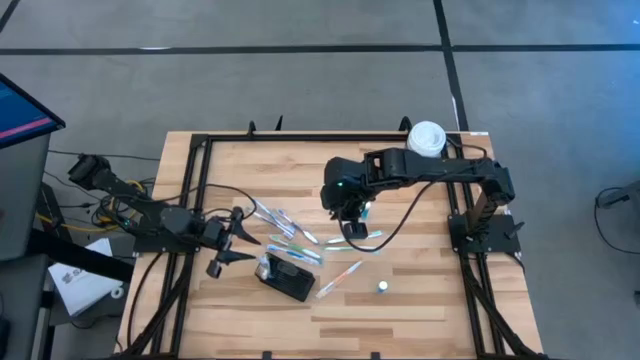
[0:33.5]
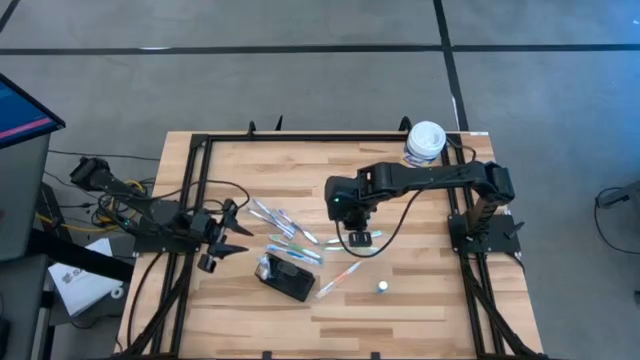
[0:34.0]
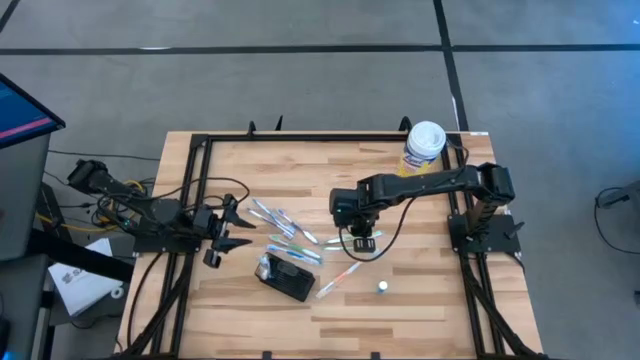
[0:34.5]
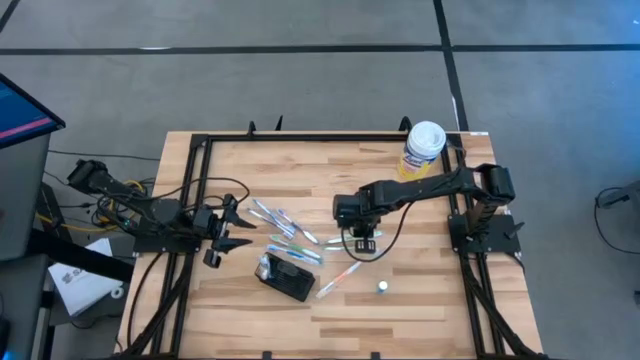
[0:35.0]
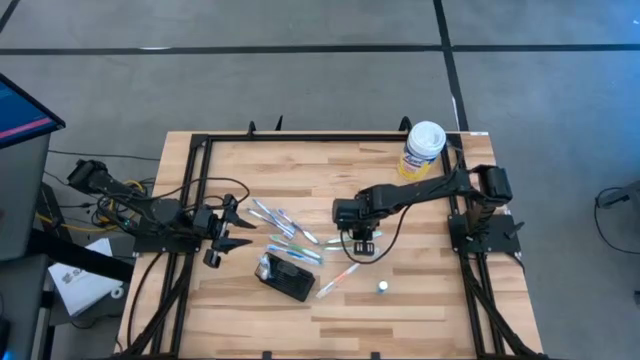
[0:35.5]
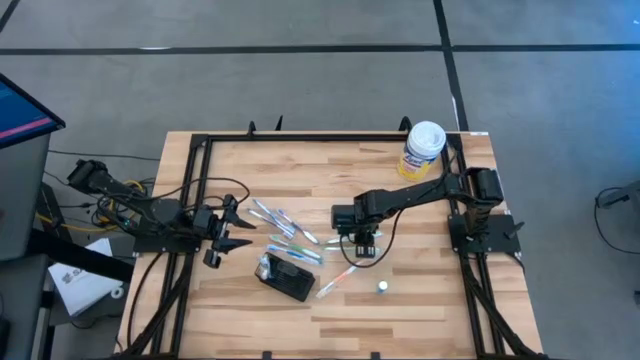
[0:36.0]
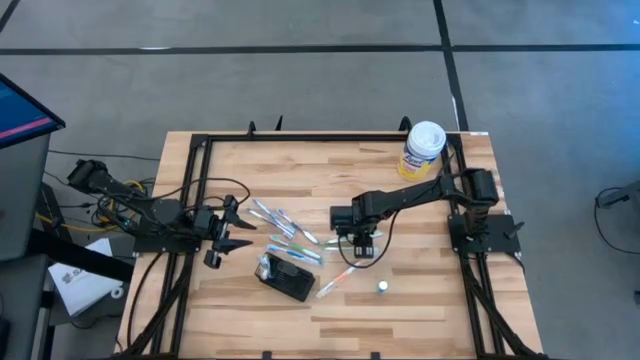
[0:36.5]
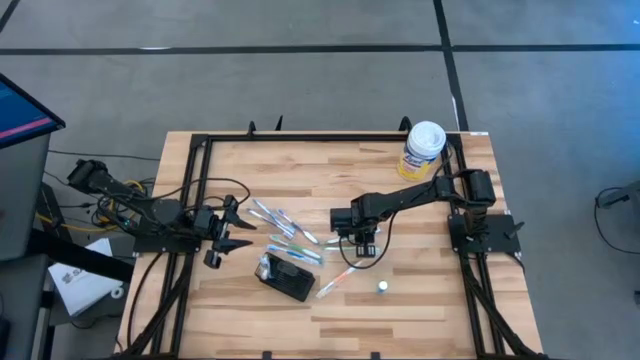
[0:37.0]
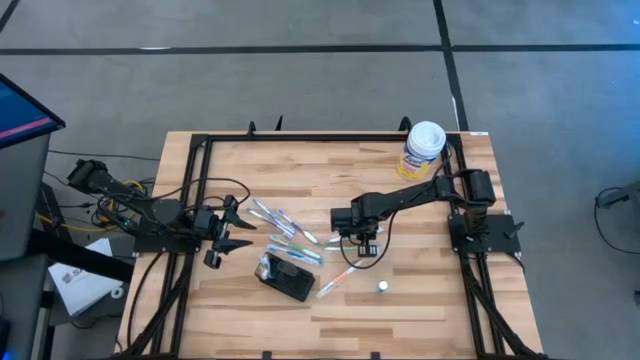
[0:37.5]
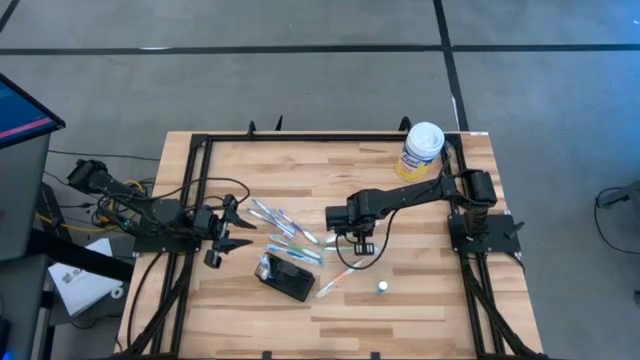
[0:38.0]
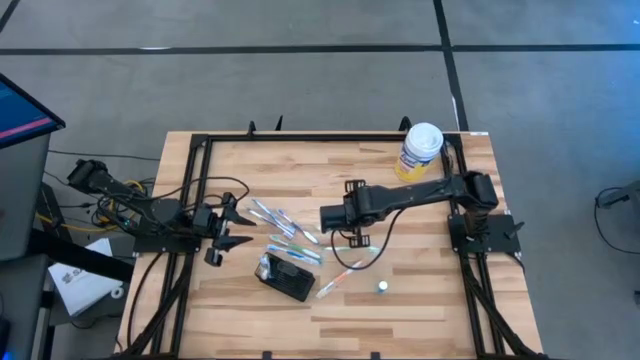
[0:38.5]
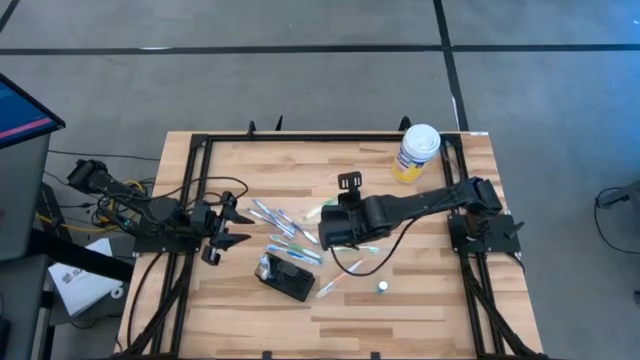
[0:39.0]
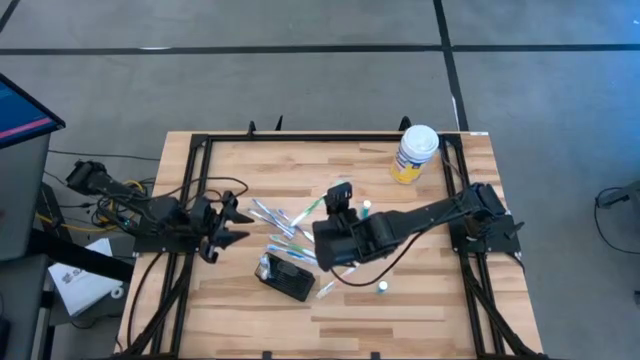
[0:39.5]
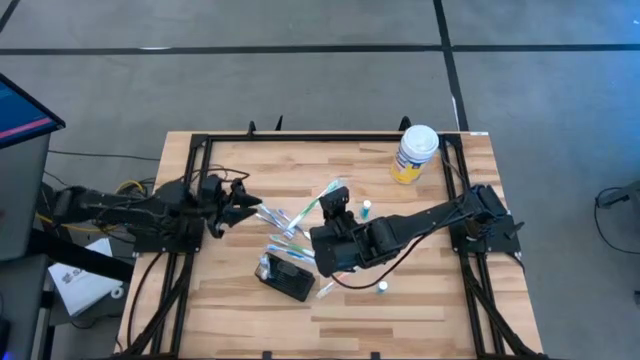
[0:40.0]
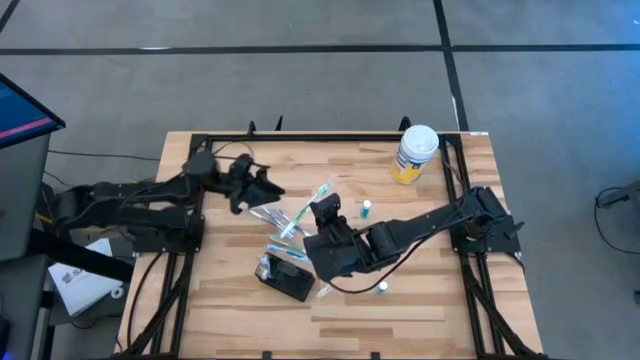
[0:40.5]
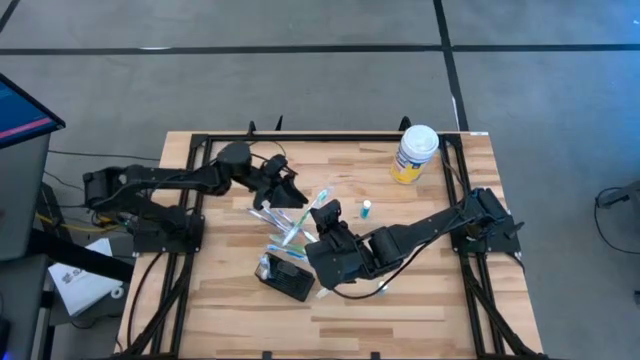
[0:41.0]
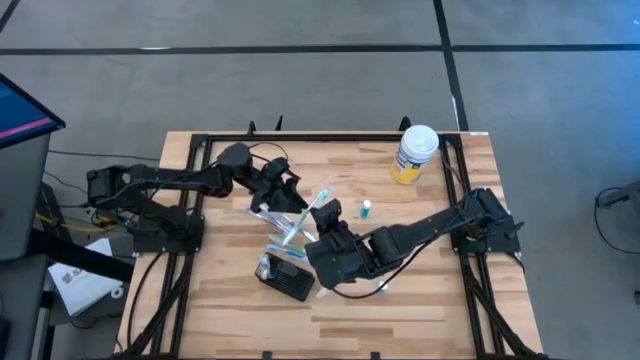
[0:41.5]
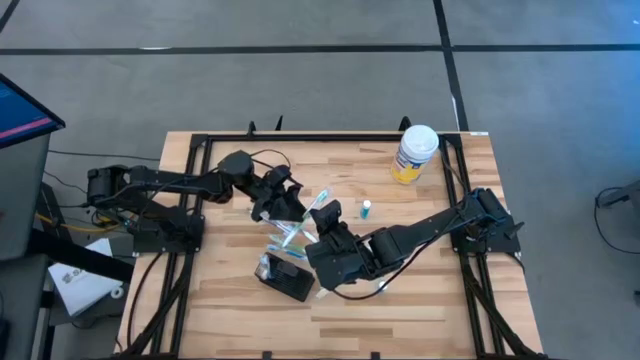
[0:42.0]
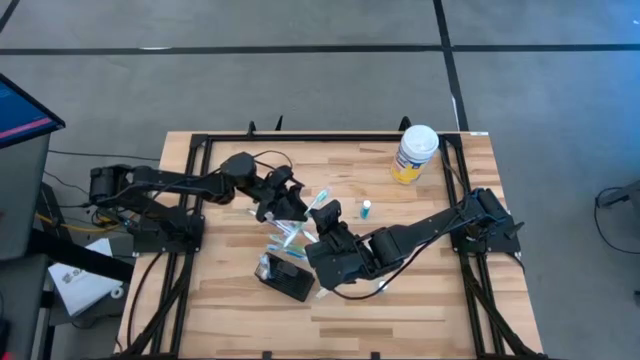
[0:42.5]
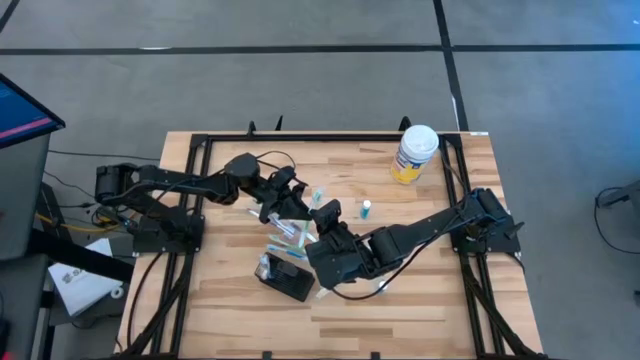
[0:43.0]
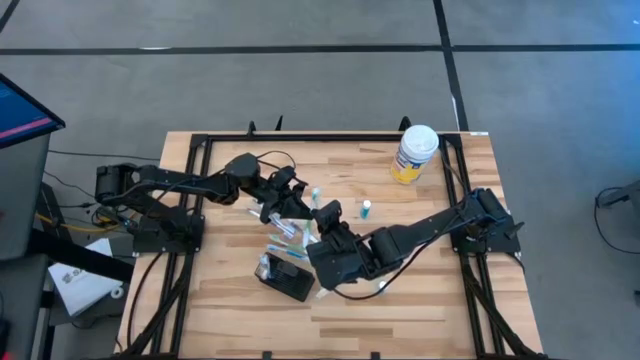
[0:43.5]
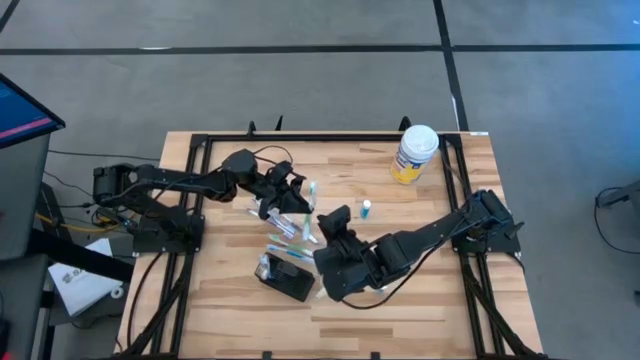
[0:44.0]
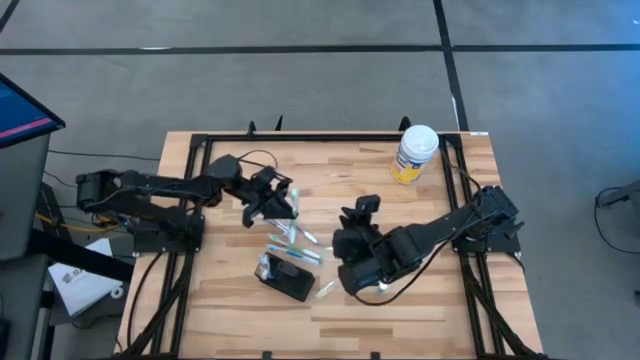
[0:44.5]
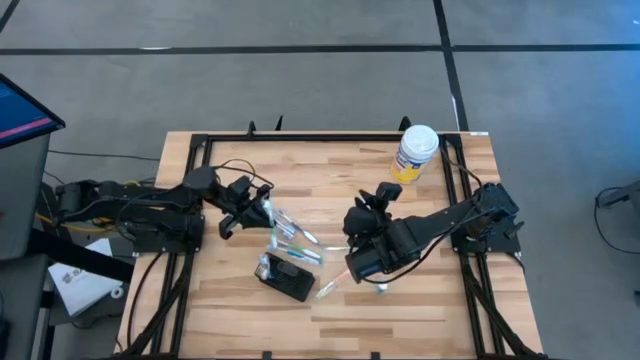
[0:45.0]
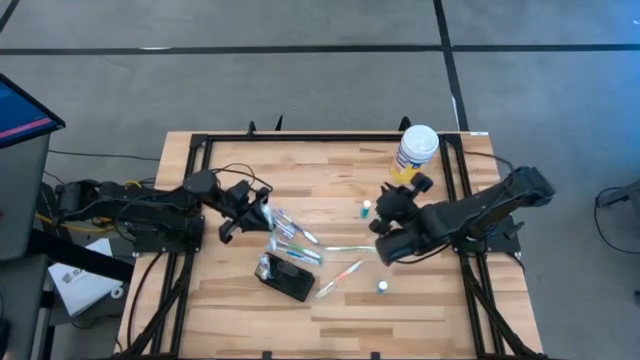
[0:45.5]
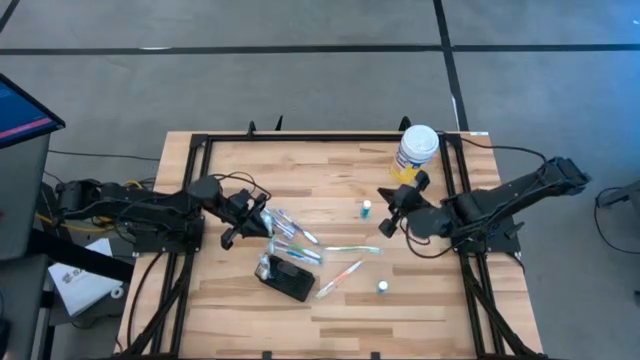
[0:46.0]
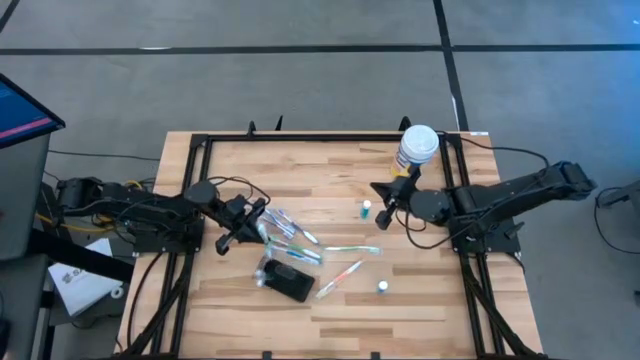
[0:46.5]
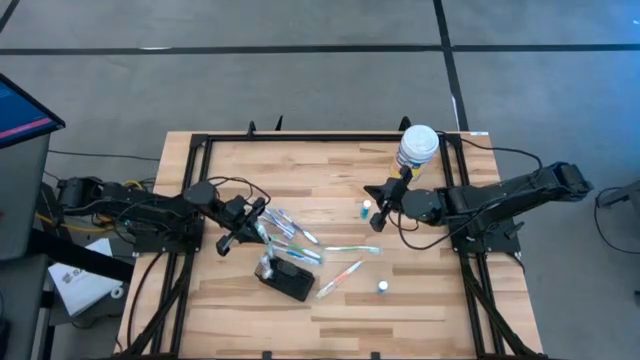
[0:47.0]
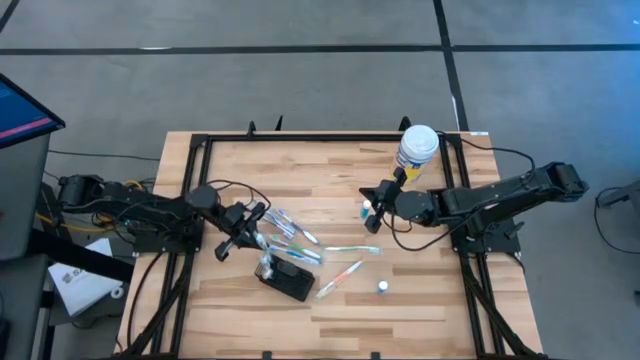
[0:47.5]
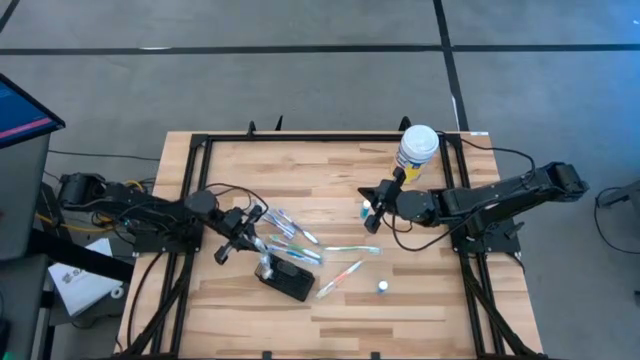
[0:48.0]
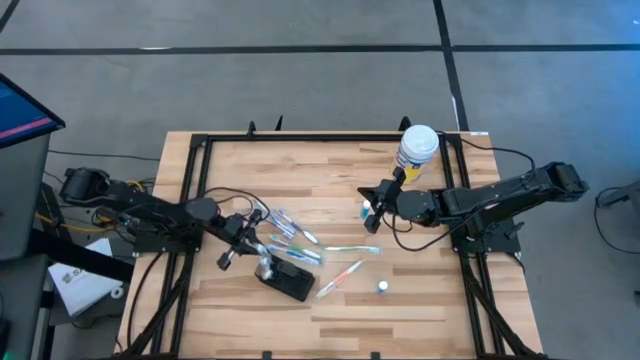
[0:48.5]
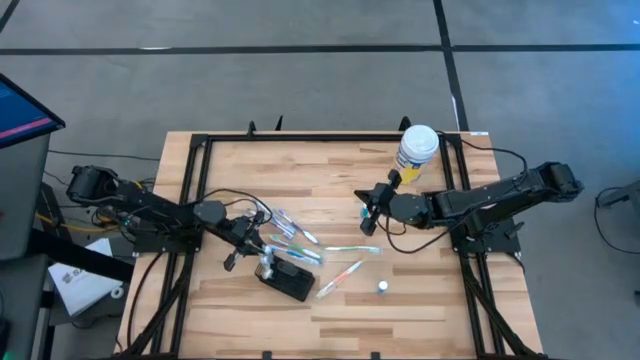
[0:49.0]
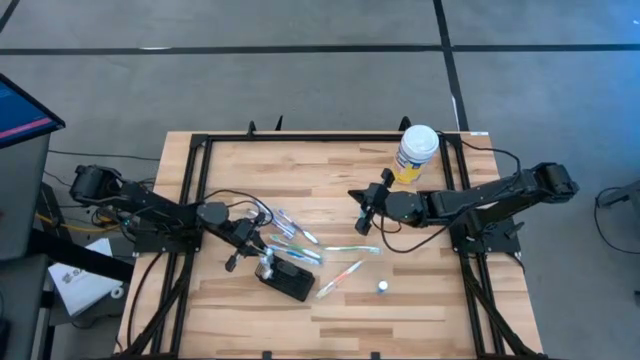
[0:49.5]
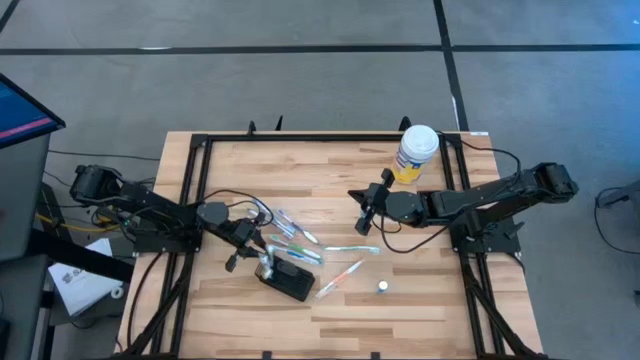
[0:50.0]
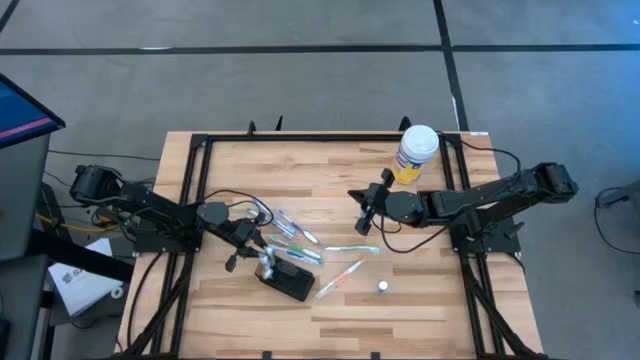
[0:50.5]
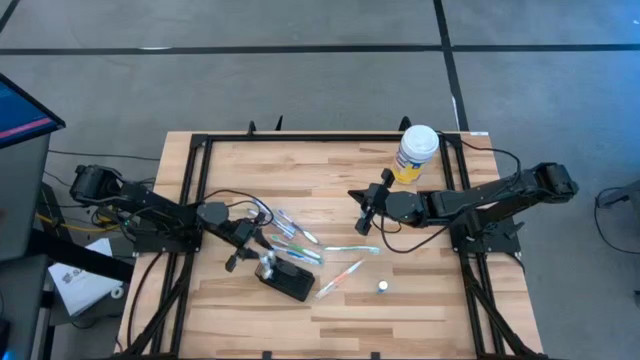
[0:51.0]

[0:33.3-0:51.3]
Task: Pick & Place toothbrushing station
Put the green toothbrush into the mesh organizer
